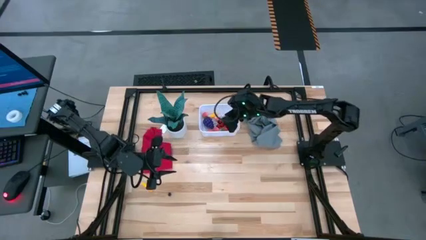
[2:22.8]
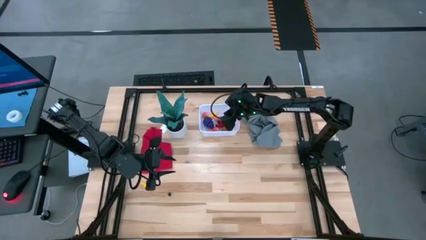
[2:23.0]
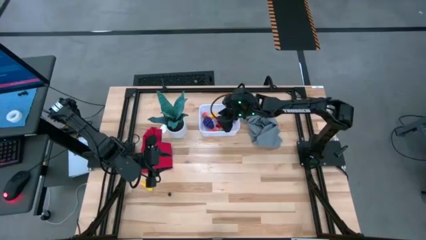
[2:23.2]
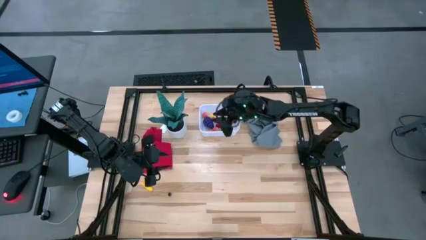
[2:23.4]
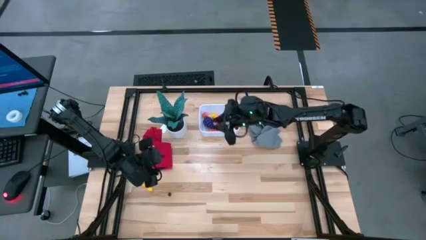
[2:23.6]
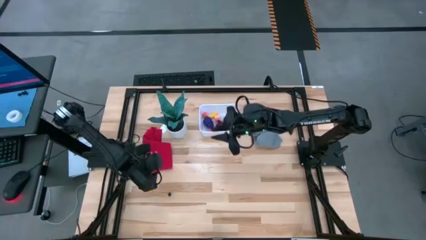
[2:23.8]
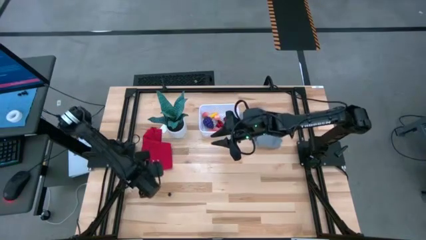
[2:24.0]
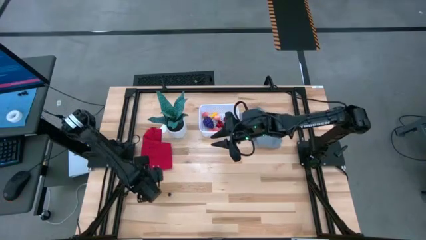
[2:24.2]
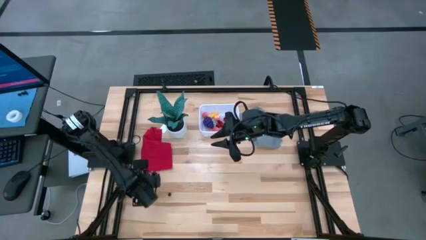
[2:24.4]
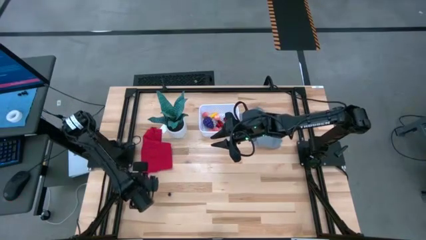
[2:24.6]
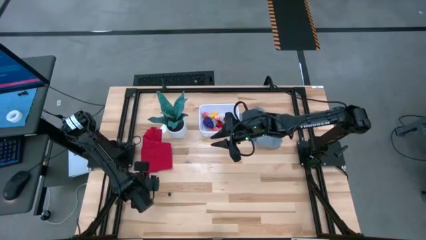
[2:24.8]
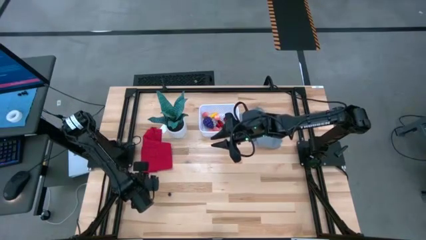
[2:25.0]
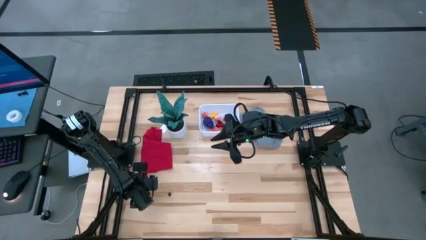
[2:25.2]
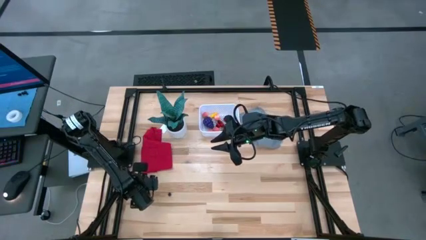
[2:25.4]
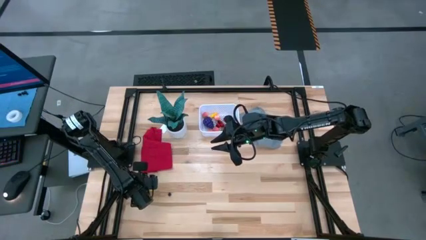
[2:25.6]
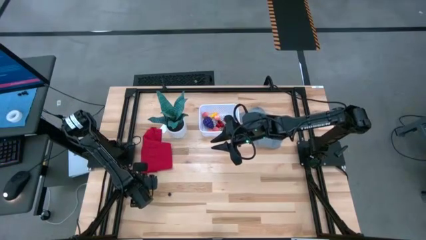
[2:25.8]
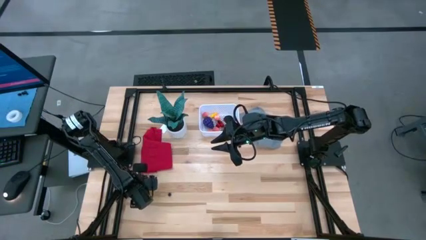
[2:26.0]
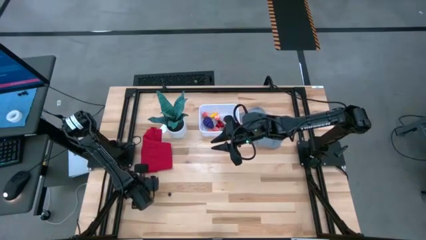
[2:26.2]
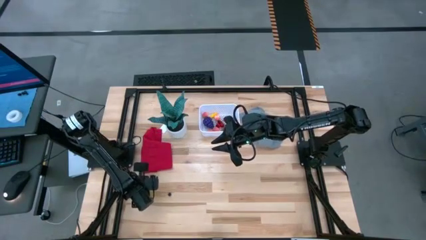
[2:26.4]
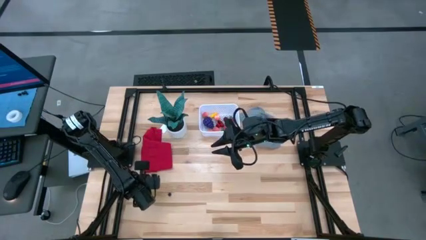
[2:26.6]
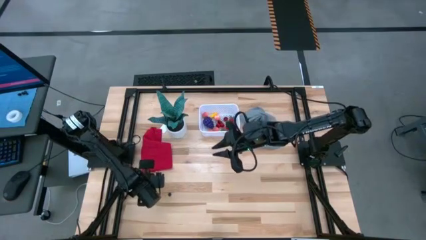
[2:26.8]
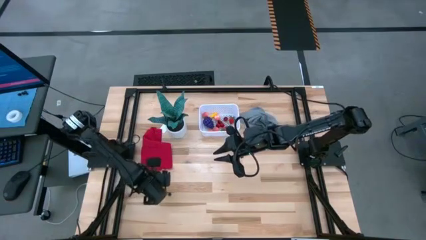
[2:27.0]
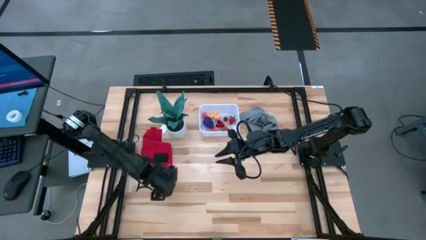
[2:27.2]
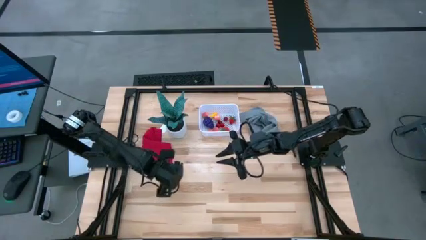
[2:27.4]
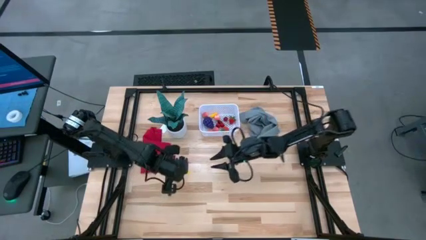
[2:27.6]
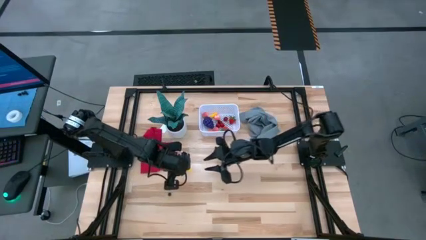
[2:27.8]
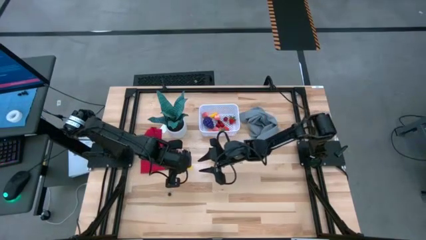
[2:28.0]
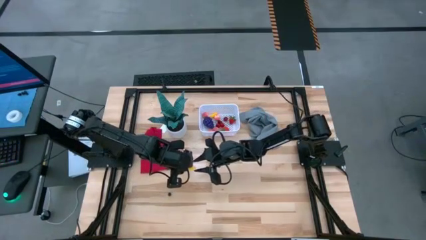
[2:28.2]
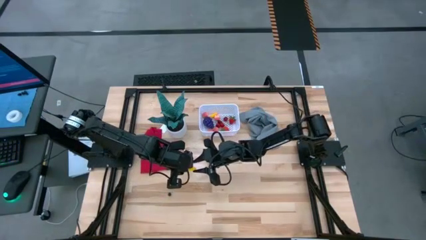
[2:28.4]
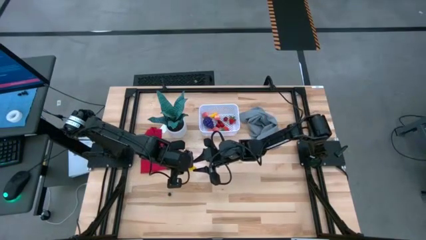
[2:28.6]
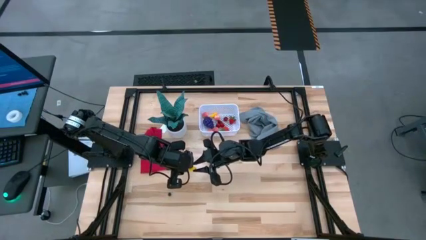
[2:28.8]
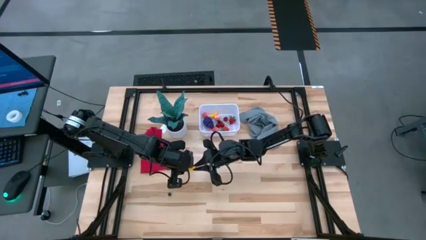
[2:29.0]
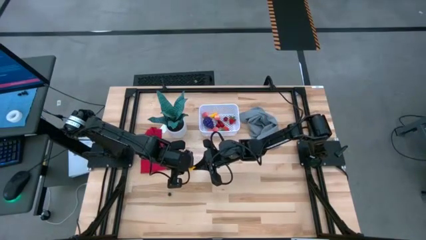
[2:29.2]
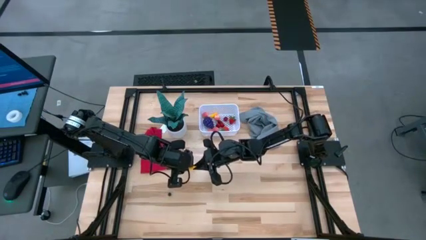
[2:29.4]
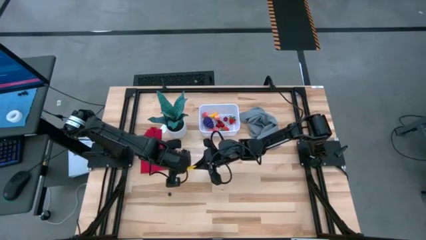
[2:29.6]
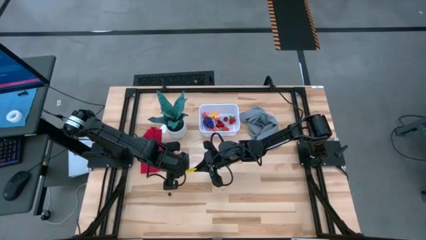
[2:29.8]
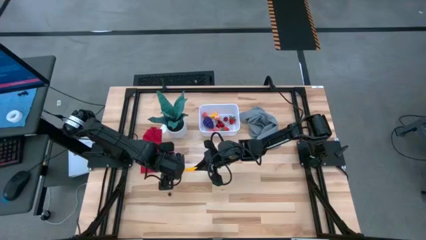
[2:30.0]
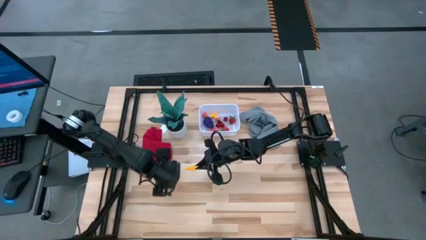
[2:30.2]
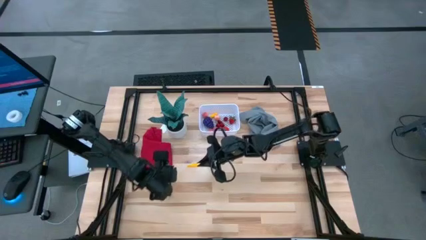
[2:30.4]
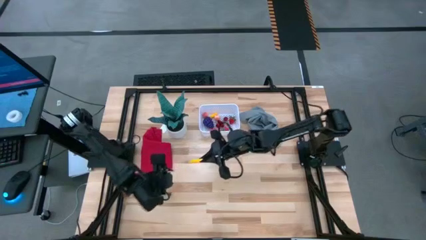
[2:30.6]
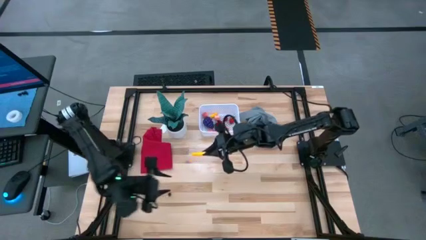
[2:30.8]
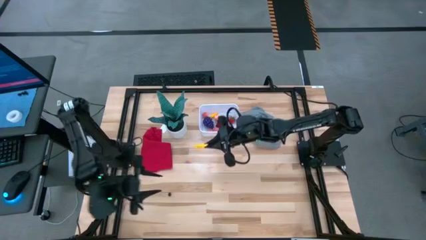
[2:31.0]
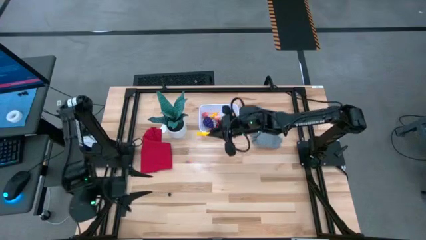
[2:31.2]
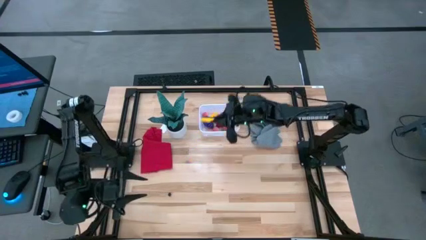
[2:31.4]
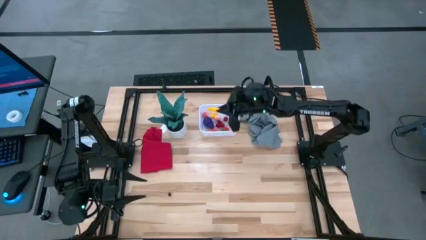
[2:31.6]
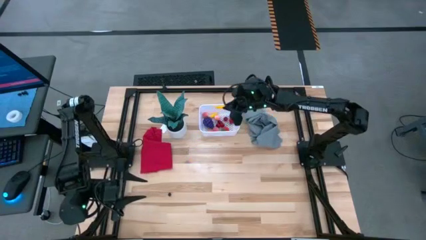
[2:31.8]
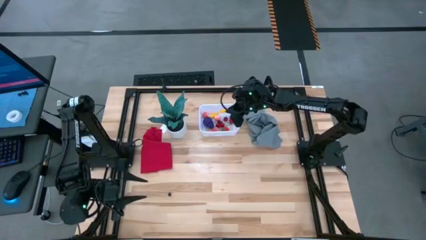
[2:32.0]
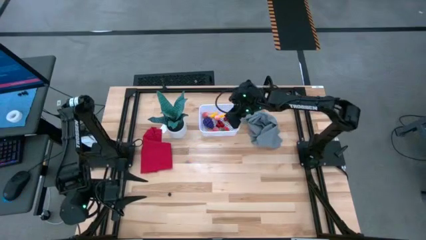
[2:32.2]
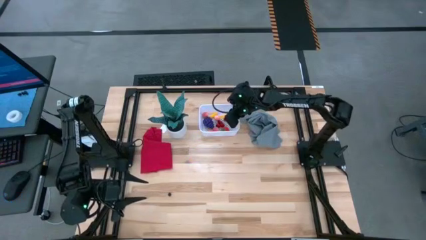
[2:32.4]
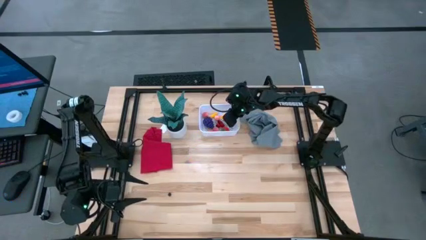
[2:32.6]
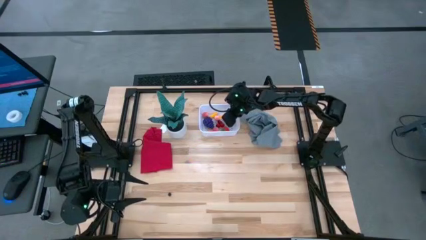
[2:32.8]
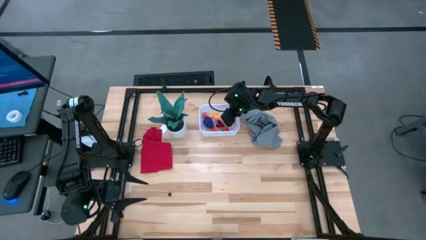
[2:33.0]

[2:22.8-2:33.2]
Task: Pick and placing Produce into tupperware
Put the yellow corn into the white bin

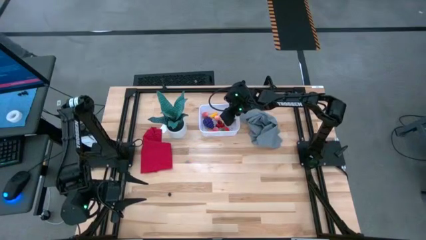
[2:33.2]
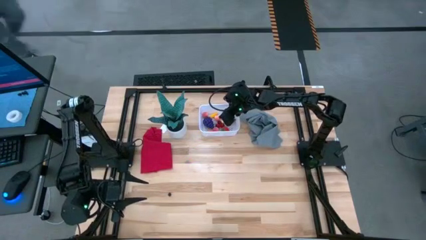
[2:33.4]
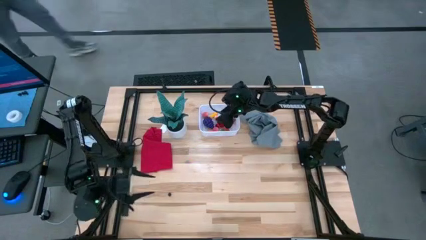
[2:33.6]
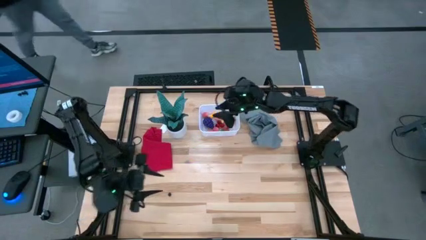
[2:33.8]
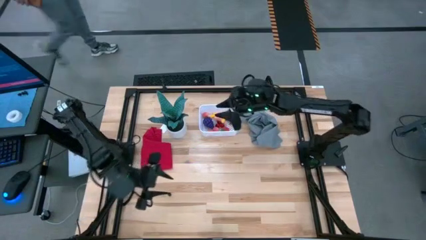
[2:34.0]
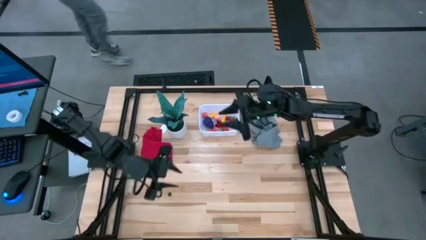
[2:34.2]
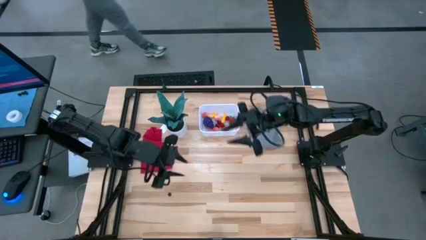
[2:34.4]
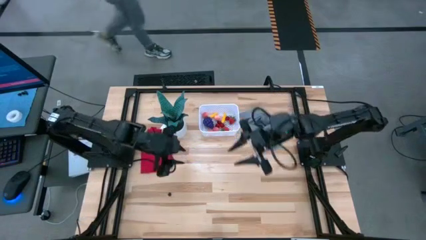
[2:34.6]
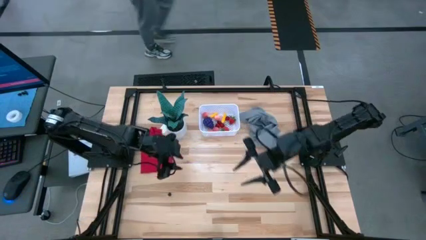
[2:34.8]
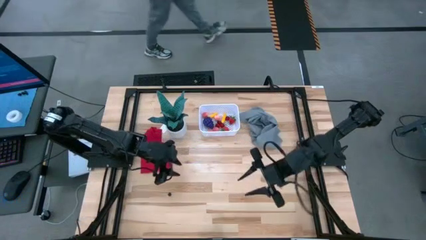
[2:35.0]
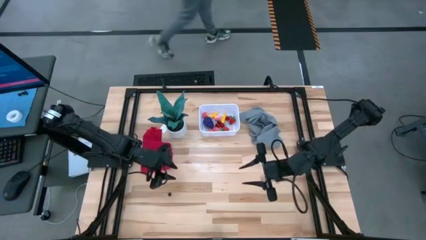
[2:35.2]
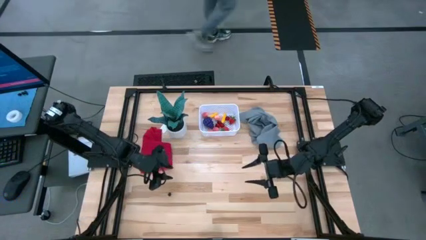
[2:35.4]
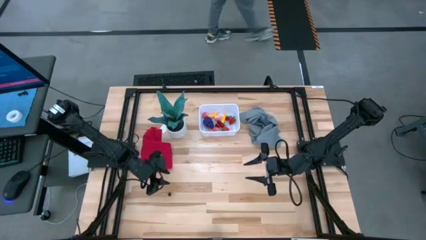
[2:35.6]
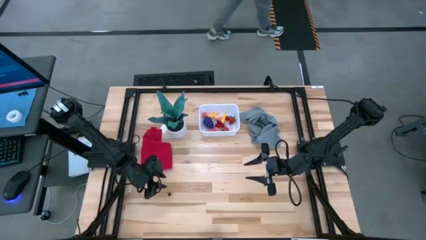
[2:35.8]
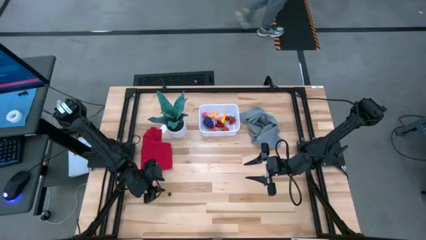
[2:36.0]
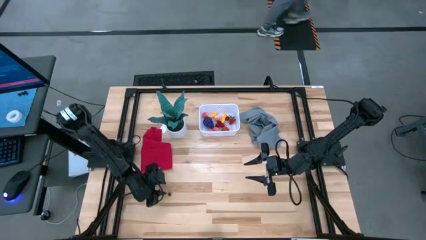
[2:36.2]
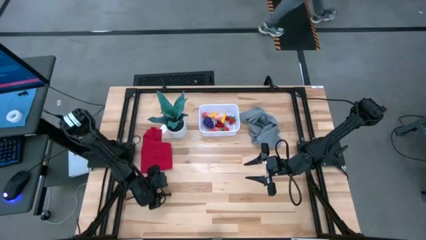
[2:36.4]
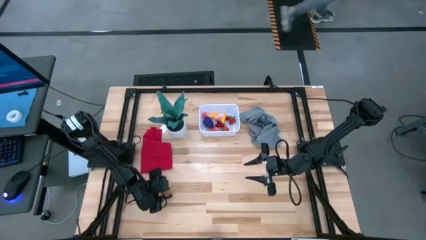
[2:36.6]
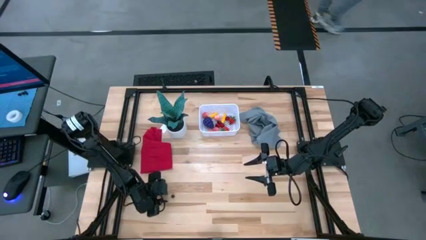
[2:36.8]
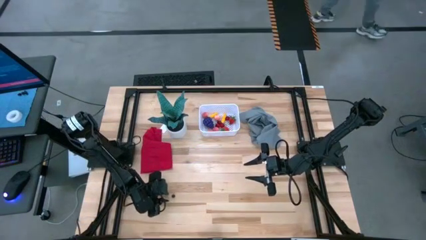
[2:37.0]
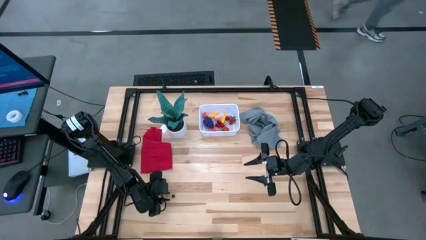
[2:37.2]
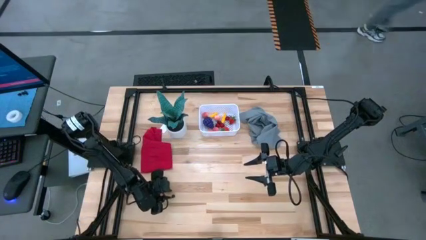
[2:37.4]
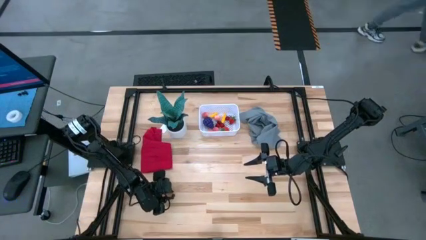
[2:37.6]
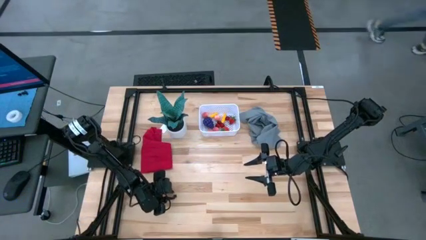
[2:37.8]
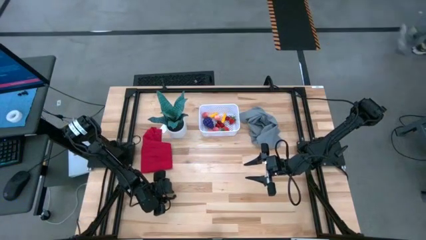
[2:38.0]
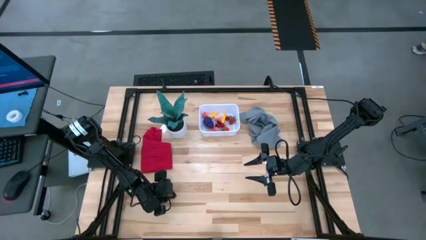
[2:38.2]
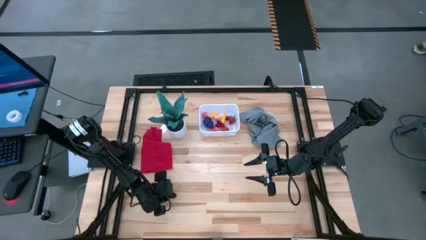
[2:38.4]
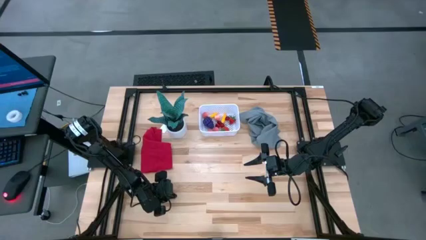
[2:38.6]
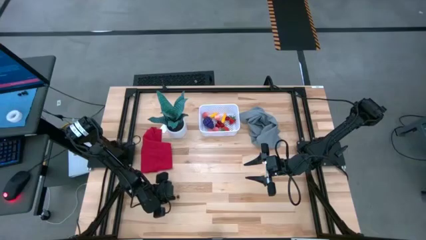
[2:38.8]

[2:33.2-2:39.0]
Put the blueberry into the white bin
